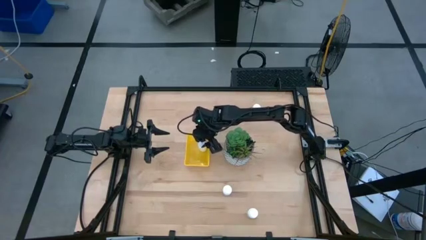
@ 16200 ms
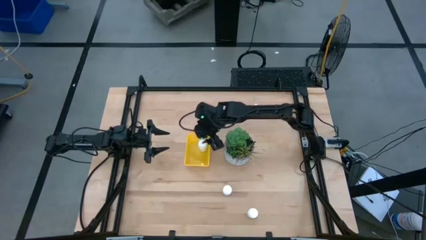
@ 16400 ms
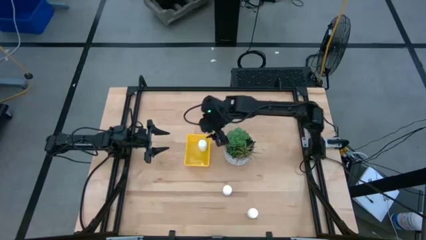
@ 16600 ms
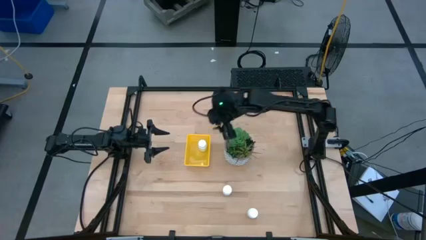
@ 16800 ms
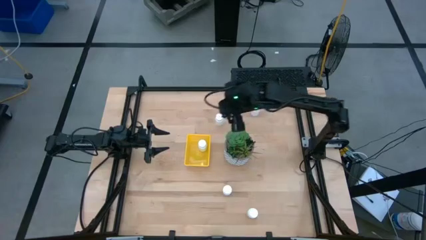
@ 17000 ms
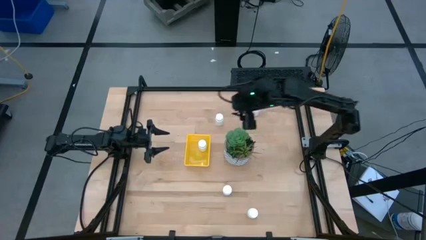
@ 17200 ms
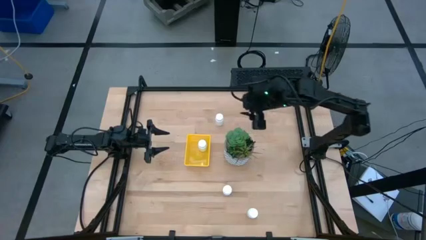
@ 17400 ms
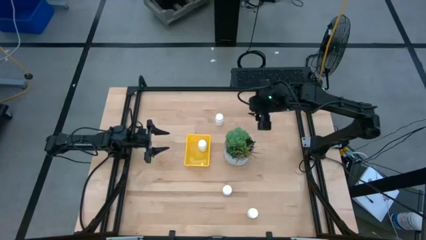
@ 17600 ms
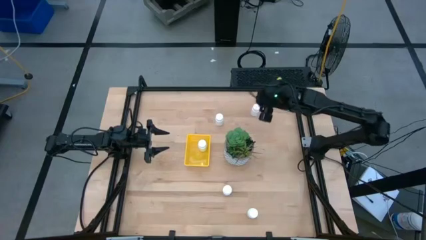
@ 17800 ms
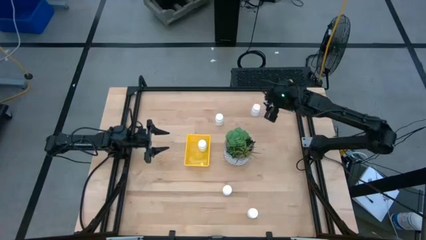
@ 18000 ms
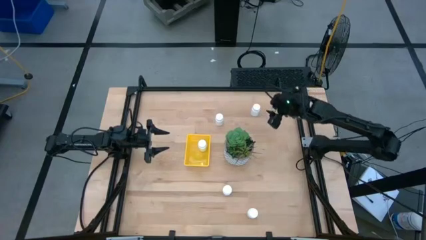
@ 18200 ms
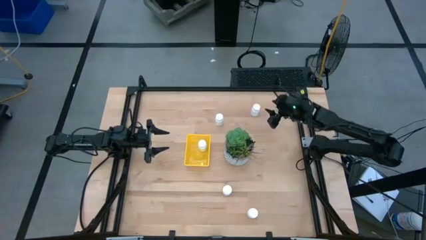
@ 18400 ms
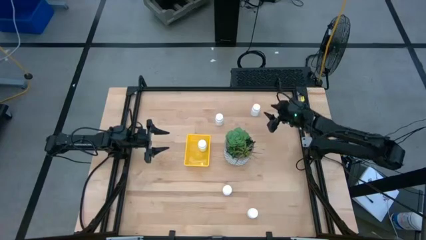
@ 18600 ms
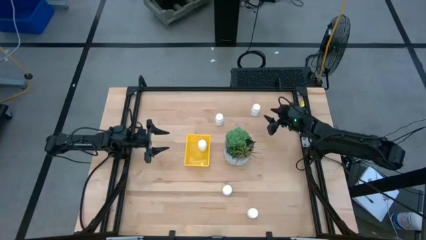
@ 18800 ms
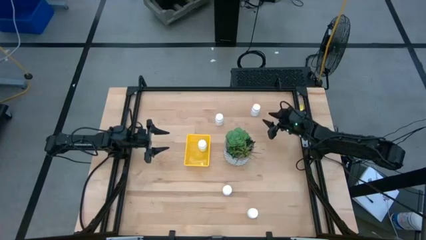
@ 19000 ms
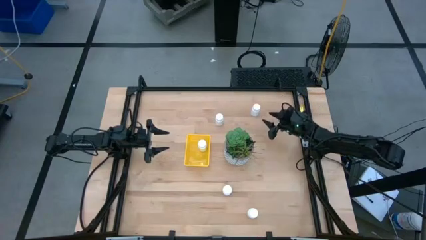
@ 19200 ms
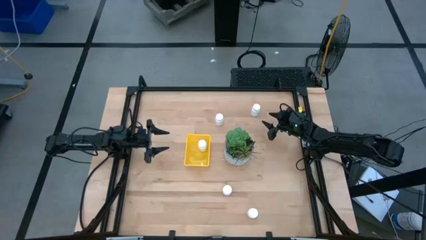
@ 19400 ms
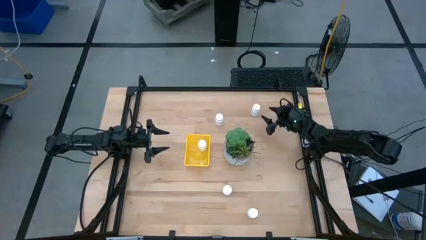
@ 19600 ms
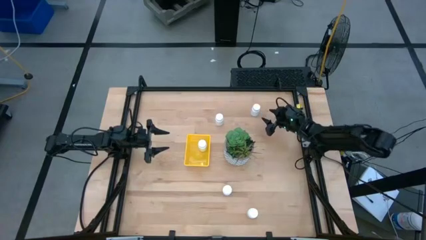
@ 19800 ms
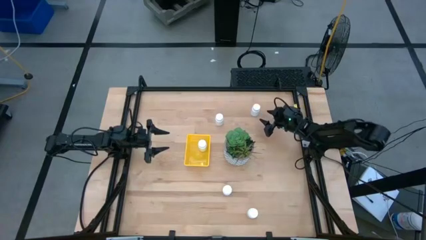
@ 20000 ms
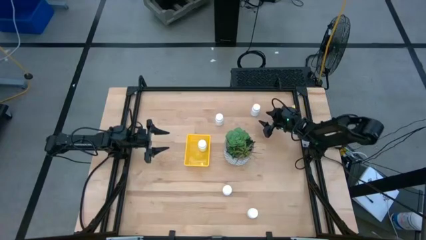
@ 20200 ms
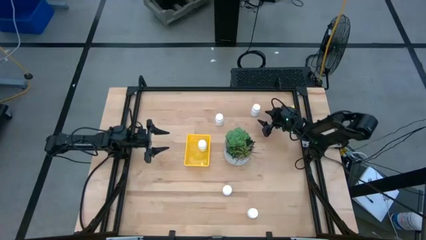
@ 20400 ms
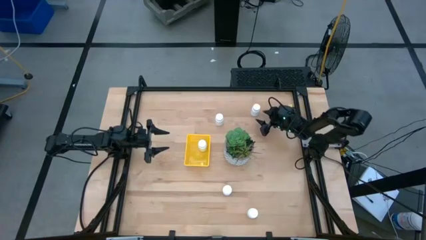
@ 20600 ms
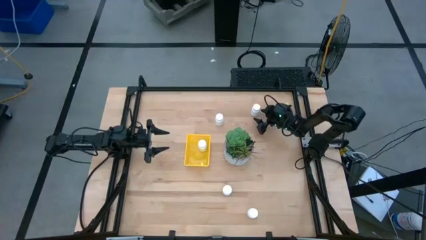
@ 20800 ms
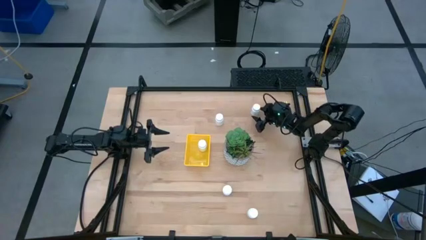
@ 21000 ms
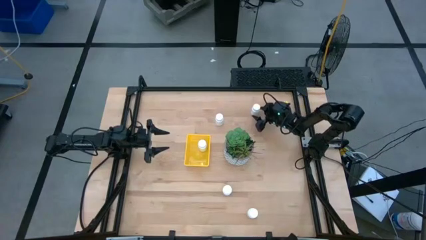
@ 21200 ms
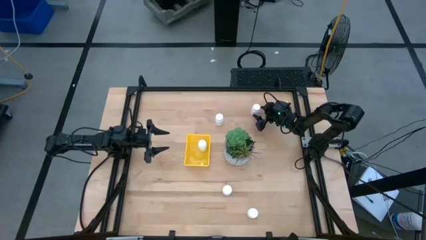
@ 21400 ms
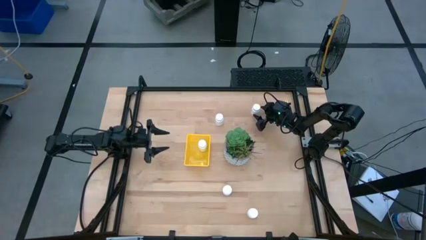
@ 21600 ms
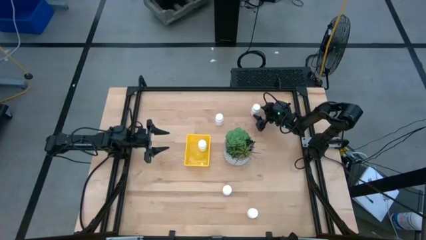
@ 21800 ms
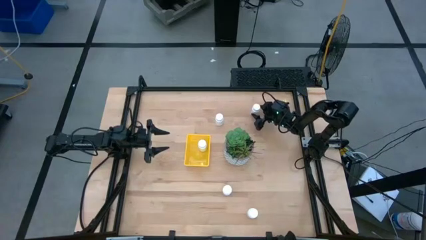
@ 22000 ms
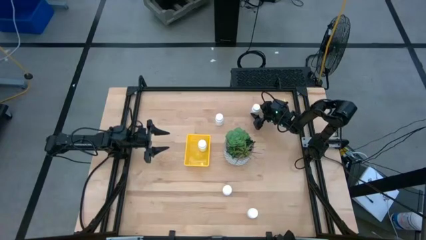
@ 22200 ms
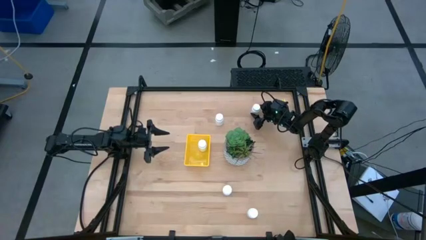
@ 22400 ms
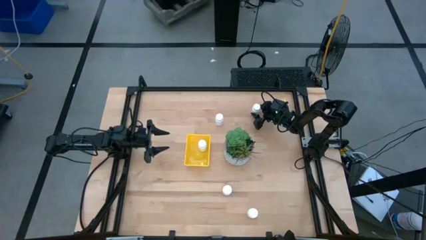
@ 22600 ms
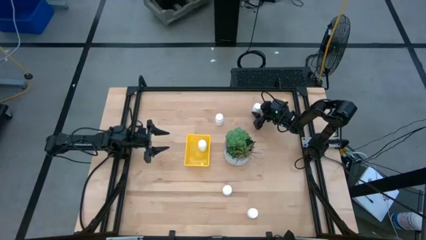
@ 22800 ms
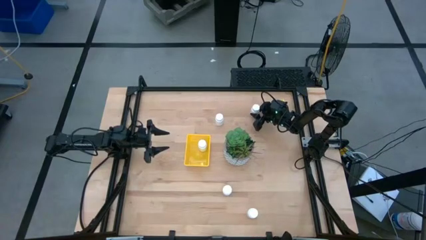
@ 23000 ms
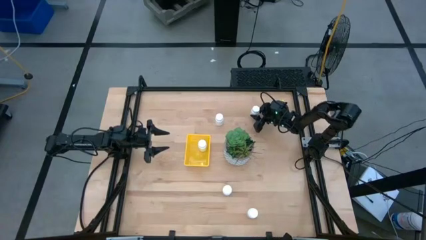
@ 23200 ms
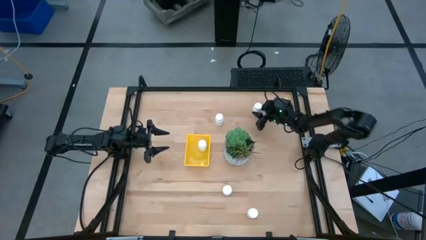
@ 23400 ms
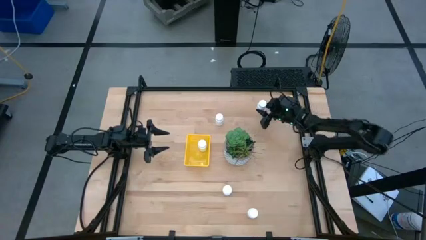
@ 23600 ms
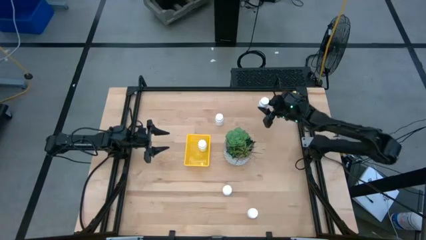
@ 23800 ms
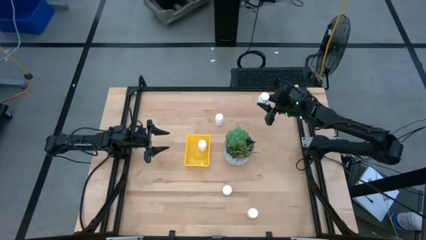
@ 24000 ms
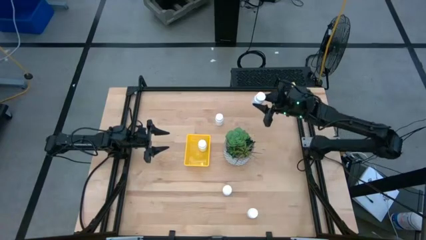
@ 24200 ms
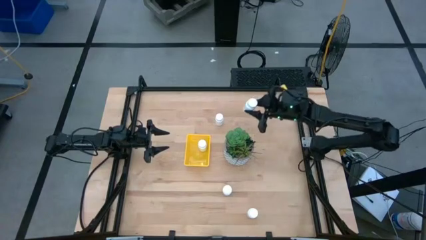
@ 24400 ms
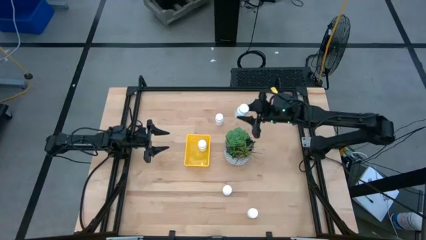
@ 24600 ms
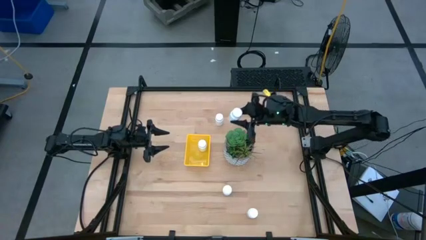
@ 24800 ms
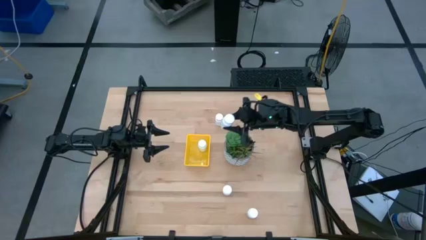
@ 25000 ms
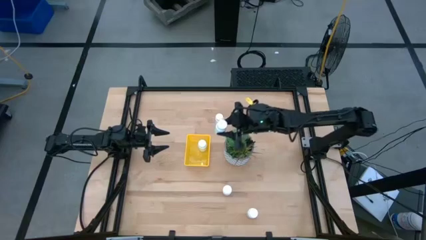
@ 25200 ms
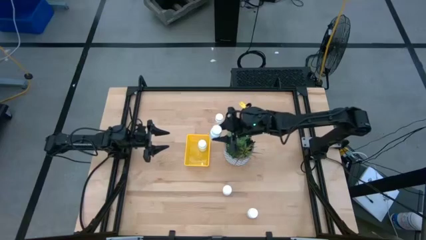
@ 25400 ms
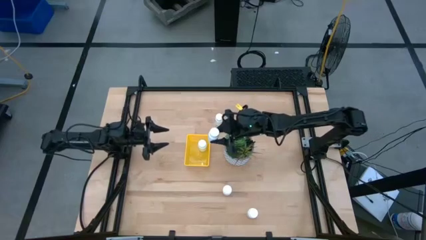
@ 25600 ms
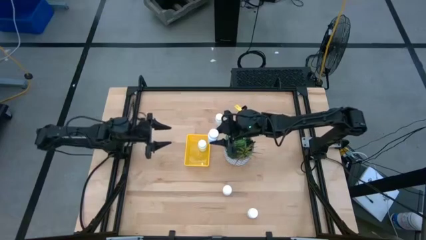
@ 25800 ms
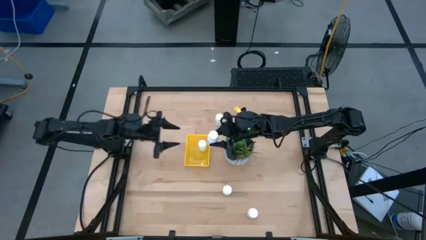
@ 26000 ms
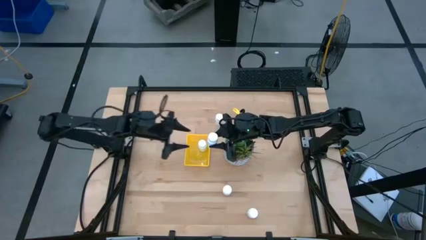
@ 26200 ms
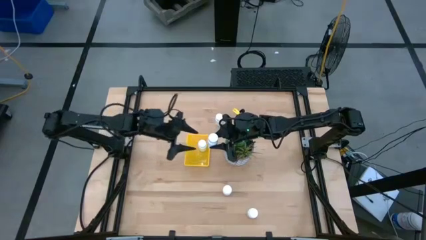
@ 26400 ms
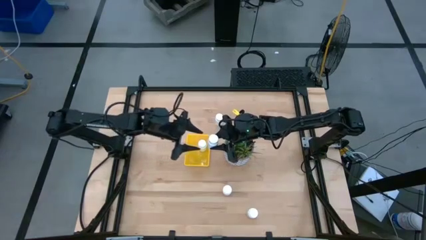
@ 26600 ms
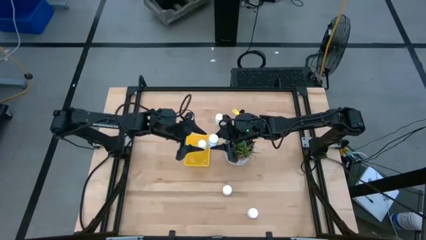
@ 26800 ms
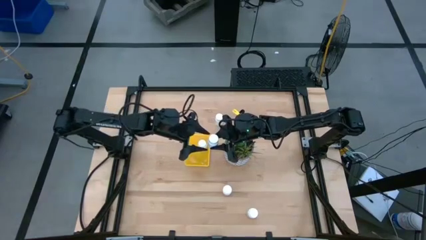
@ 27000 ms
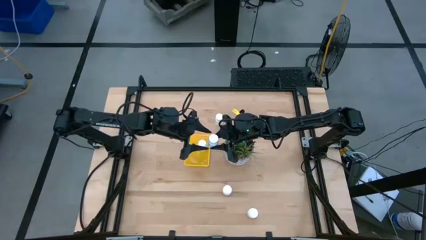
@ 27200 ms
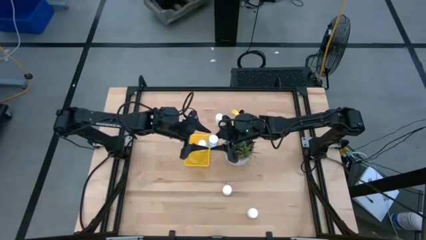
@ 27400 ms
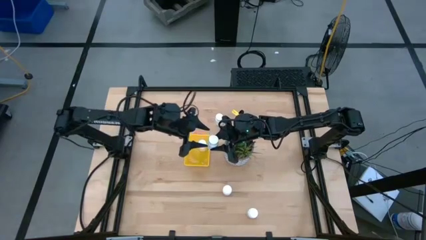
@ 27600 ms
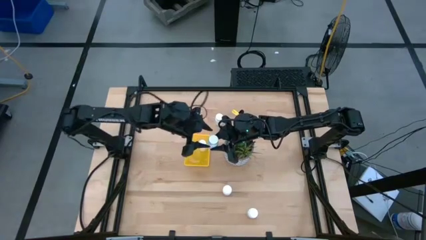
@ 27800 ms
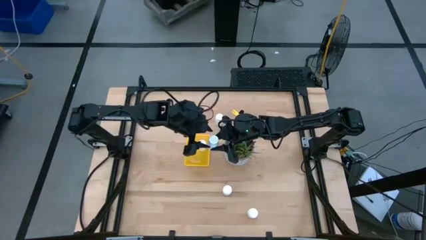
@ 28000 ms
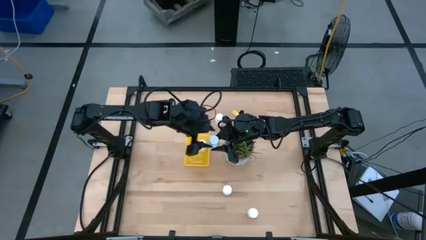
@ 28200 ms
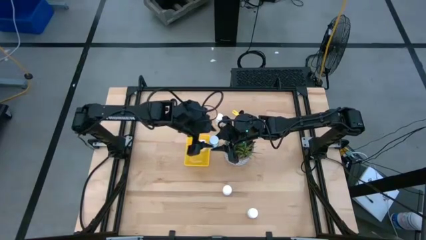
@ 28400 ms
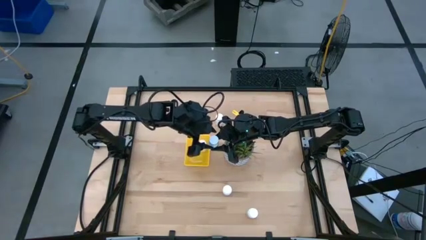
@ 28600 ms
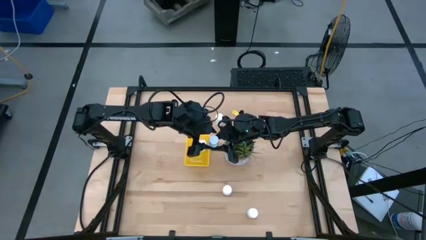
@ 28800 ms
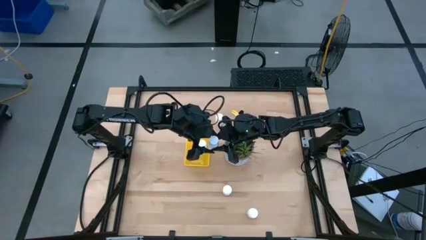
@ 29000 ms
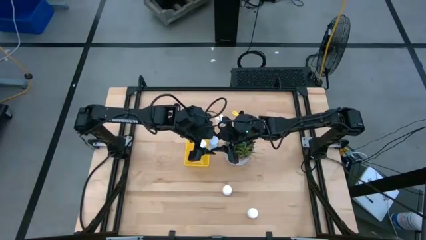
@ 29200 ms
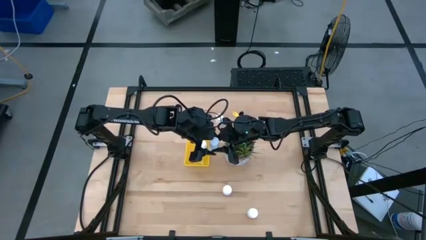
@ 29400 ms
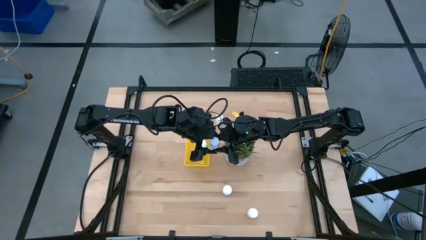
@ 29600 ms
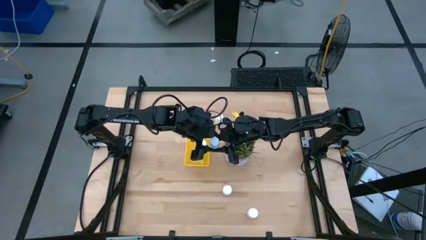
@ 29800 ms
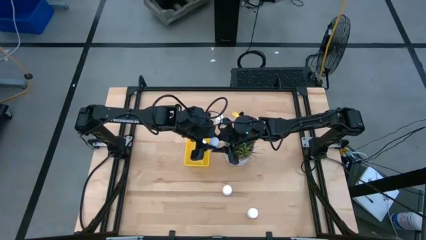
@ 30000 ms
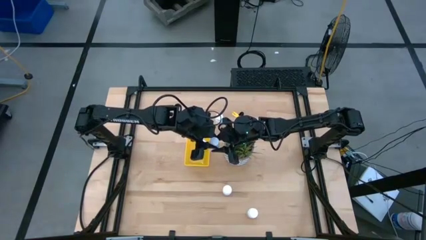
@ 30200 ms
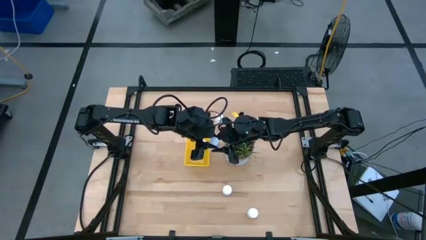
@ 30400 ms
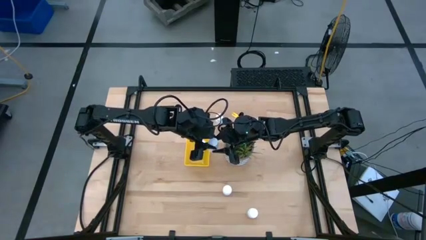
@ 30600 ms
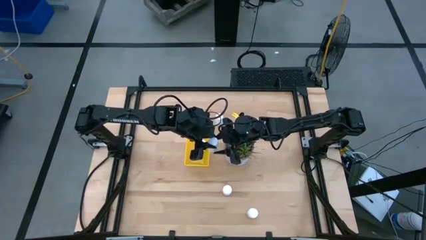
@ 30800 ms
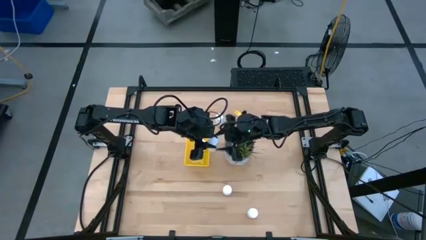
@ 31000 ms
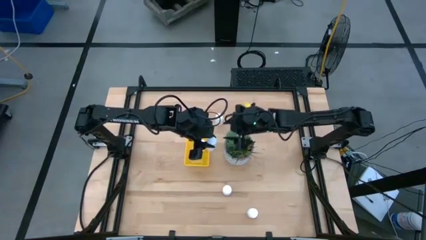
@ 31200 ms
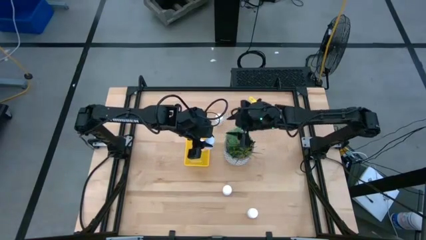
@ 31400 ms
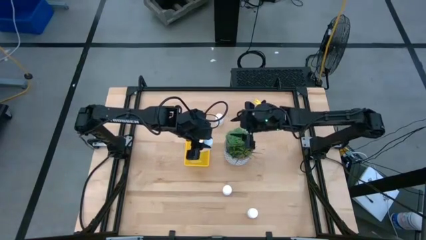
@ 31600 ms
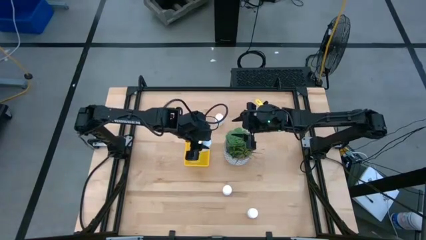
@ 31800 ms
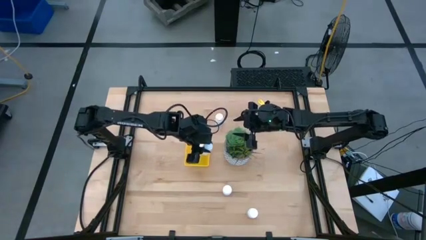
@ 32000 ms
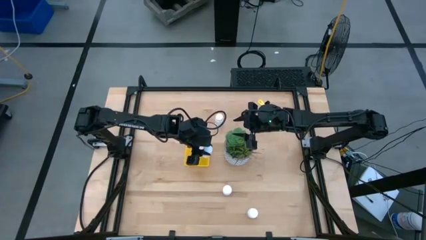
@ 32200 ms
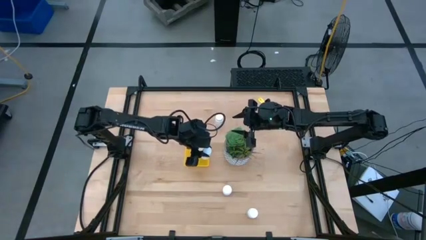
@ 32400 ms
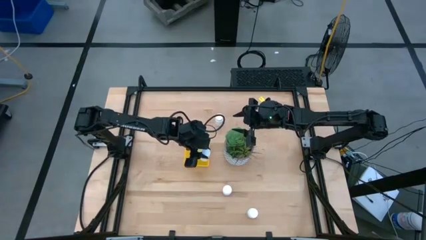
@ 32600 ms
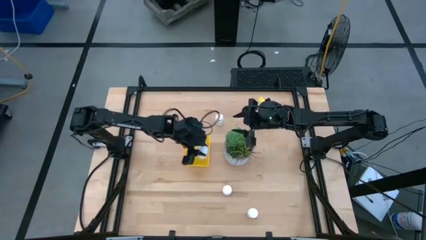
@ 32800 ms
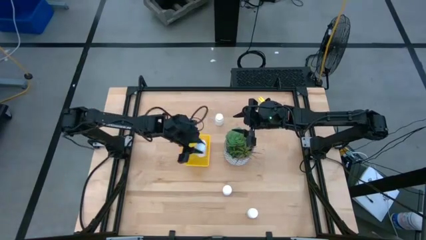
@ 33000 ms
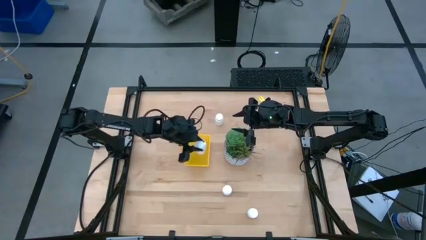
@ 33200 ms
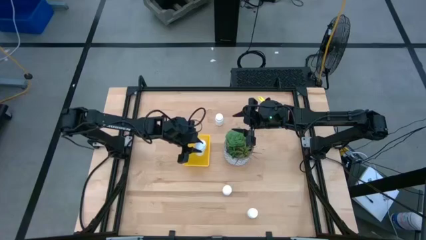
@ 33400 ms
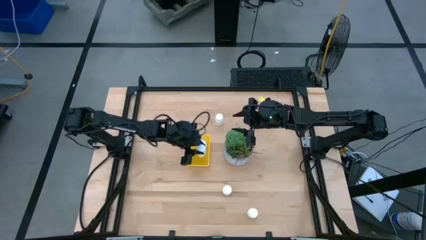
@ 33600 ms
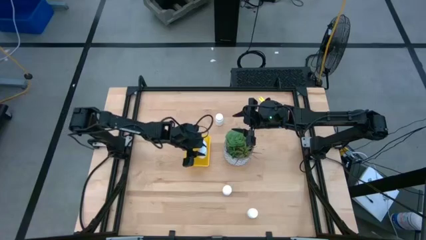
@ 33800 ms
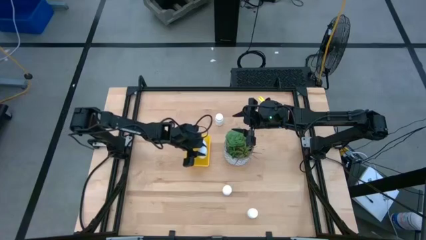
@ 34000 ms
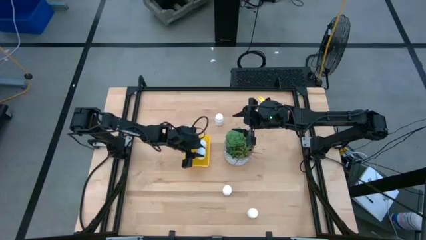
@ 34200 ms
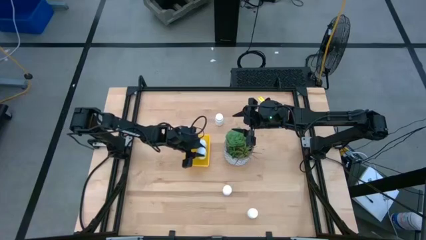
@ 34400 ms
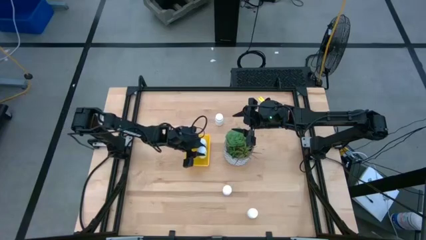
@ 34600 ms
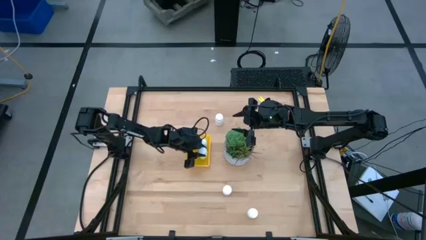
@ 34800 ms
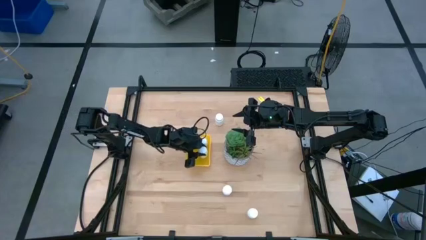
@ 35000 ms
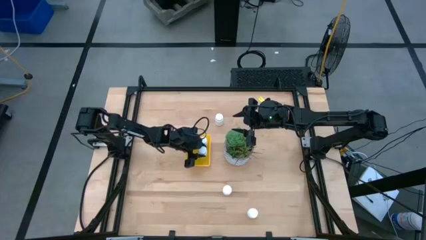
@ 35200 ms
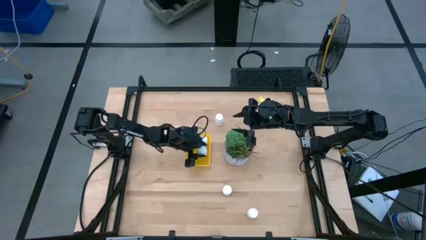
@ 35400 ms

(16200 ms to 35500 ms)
Task: Pick and place pill bottles into a basket
Put the white medicine bottle into the yellow basket
